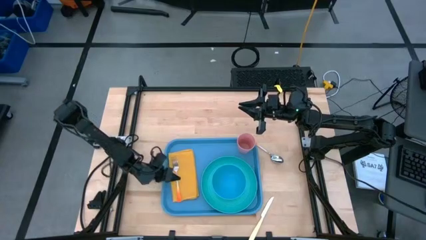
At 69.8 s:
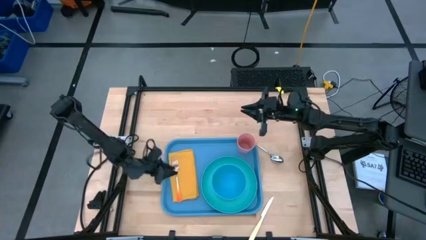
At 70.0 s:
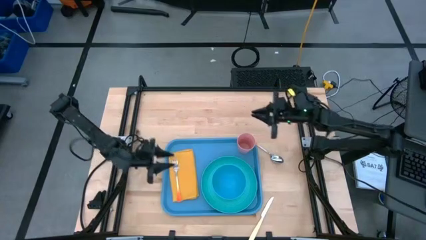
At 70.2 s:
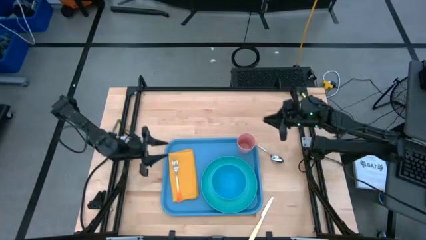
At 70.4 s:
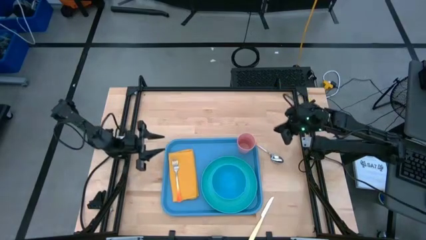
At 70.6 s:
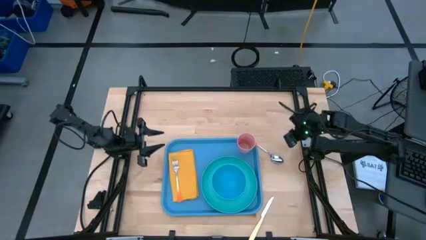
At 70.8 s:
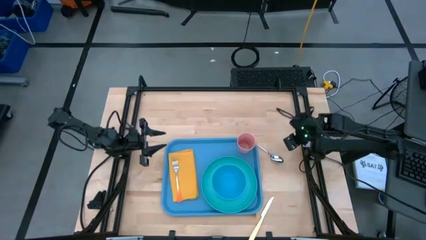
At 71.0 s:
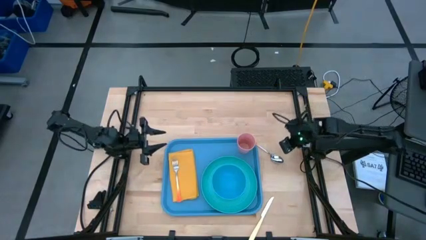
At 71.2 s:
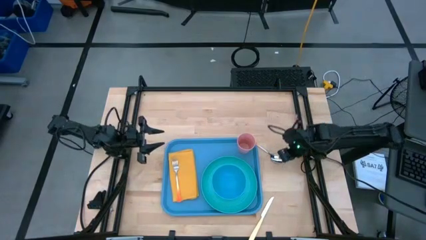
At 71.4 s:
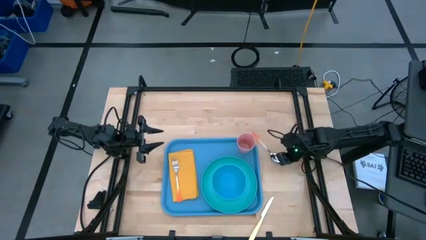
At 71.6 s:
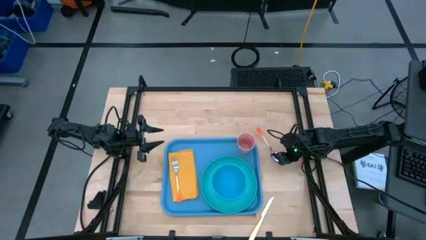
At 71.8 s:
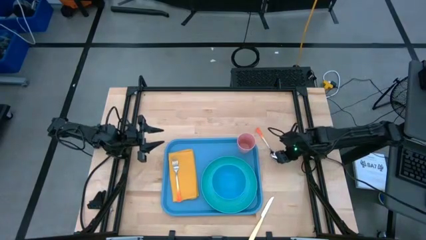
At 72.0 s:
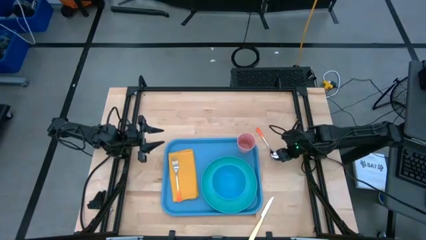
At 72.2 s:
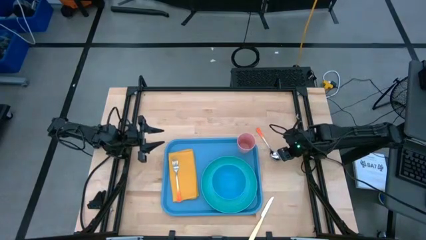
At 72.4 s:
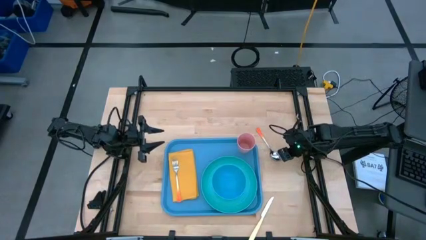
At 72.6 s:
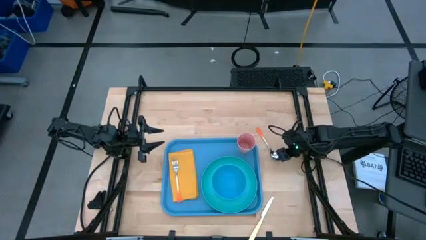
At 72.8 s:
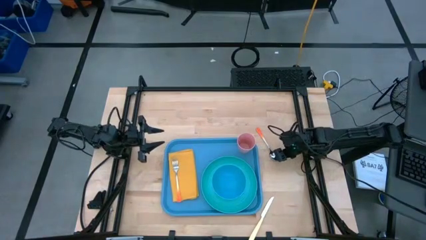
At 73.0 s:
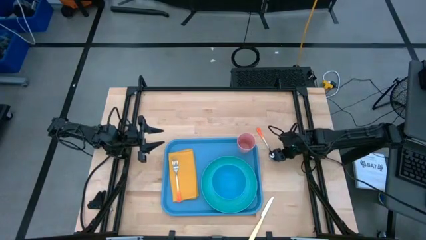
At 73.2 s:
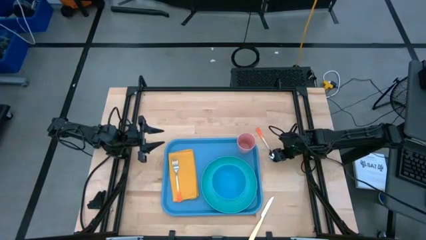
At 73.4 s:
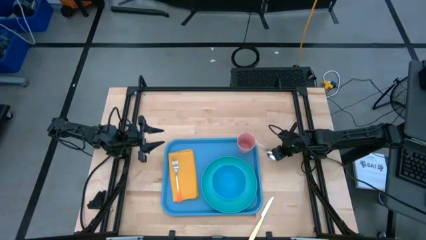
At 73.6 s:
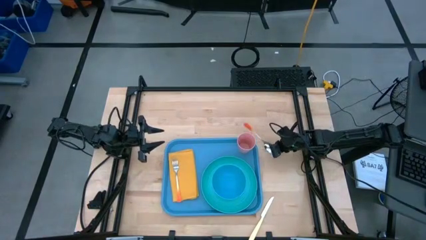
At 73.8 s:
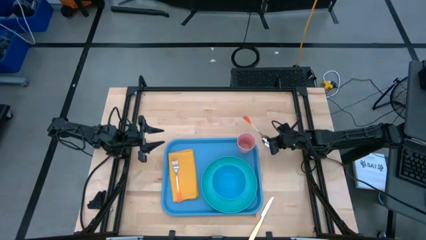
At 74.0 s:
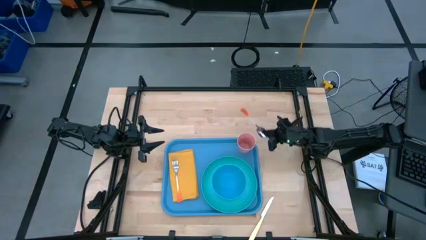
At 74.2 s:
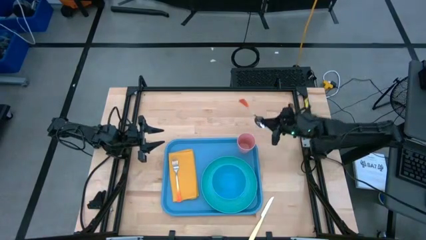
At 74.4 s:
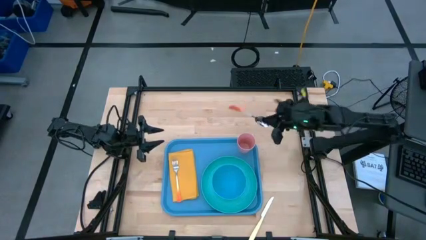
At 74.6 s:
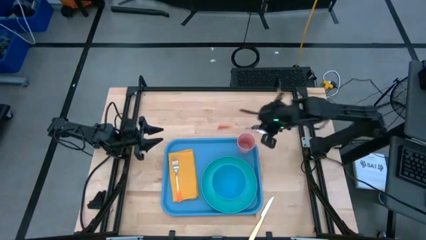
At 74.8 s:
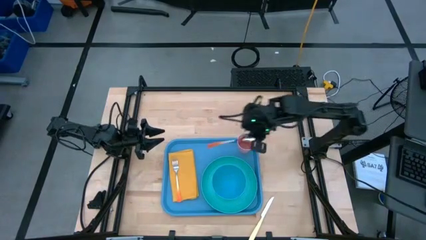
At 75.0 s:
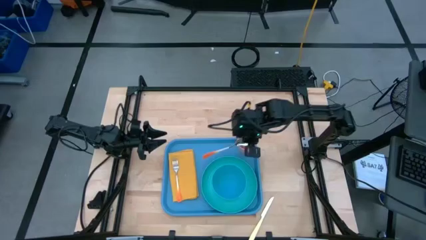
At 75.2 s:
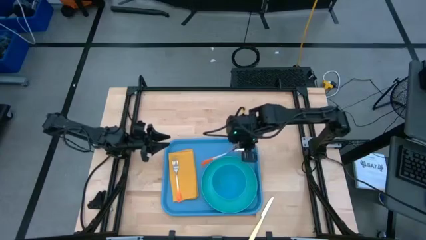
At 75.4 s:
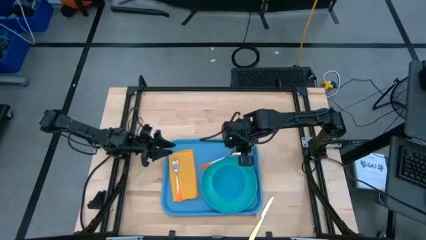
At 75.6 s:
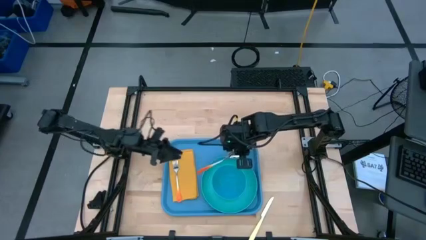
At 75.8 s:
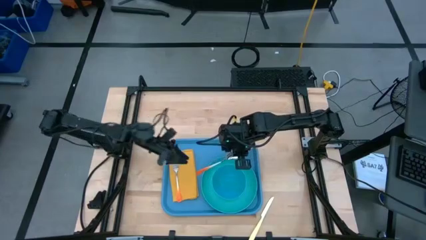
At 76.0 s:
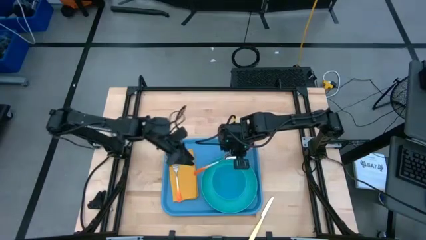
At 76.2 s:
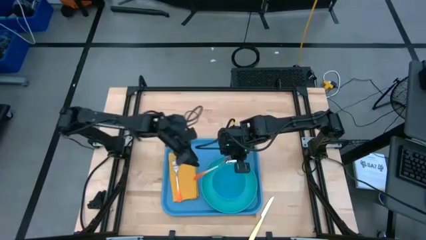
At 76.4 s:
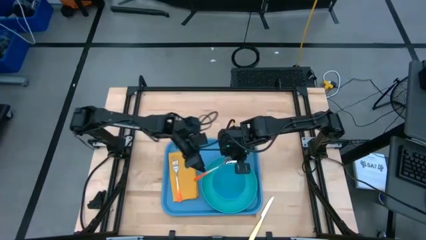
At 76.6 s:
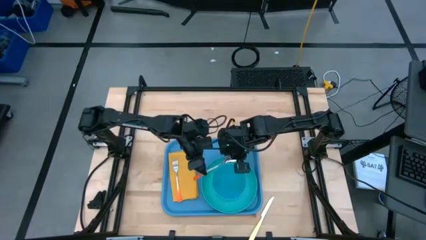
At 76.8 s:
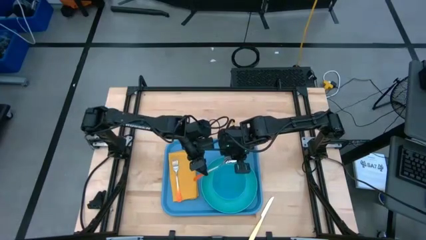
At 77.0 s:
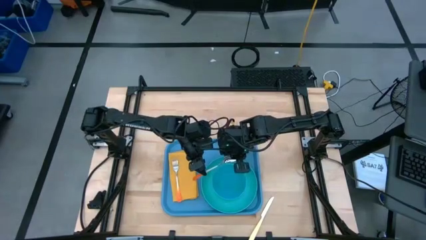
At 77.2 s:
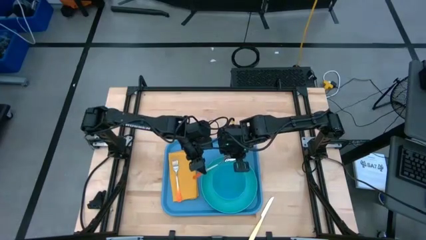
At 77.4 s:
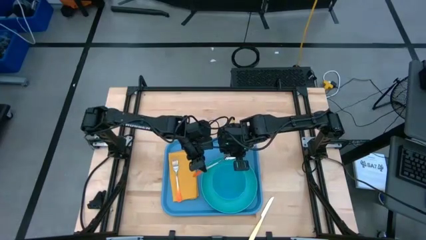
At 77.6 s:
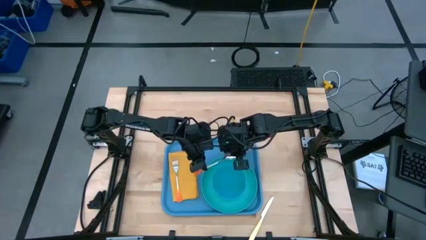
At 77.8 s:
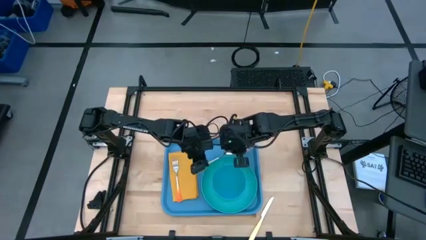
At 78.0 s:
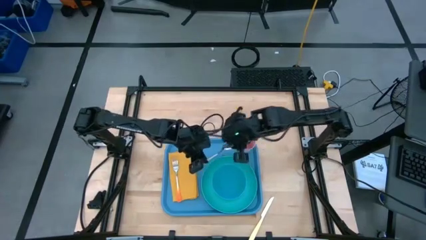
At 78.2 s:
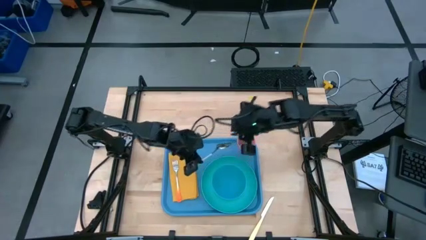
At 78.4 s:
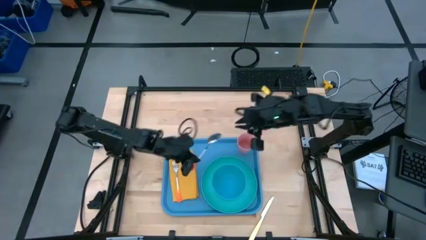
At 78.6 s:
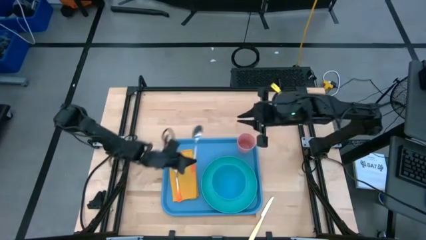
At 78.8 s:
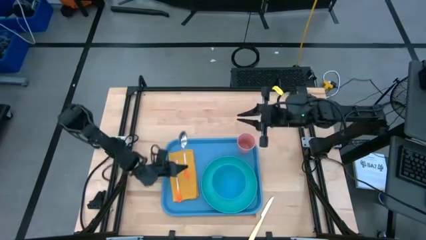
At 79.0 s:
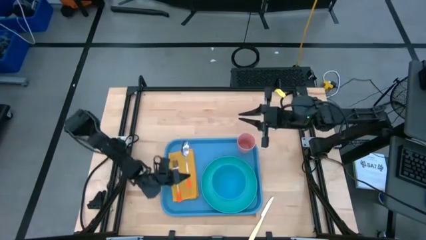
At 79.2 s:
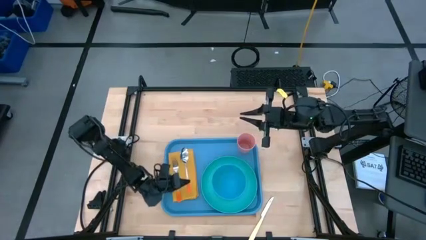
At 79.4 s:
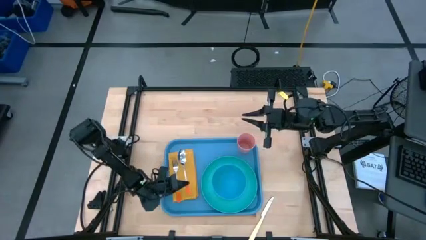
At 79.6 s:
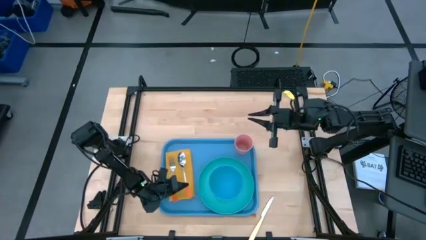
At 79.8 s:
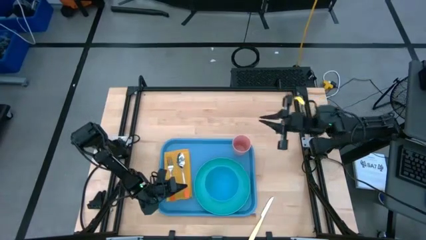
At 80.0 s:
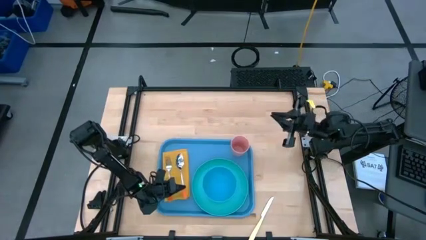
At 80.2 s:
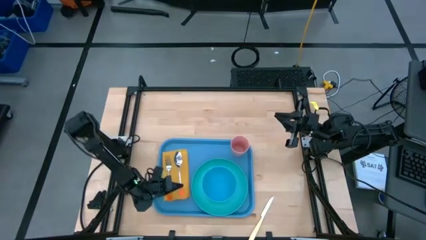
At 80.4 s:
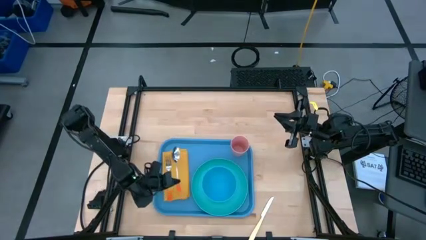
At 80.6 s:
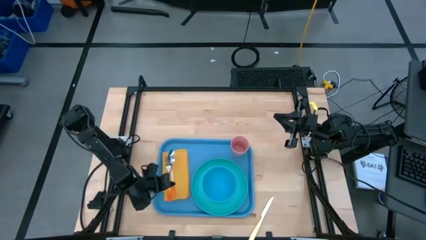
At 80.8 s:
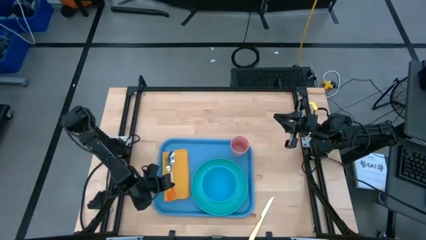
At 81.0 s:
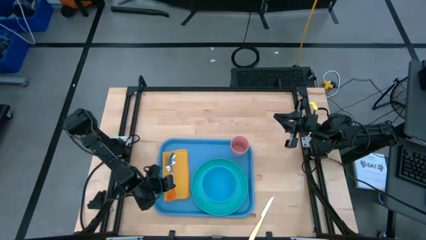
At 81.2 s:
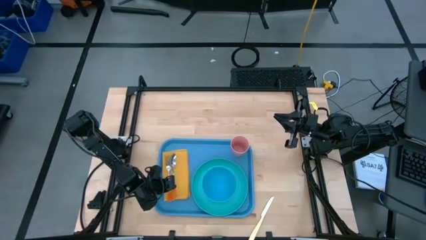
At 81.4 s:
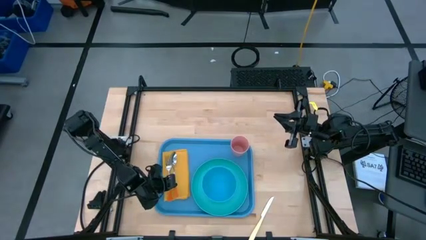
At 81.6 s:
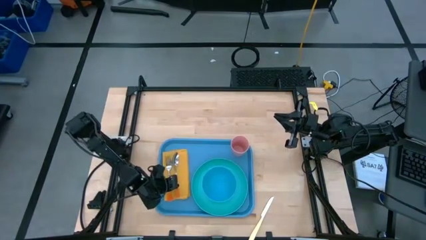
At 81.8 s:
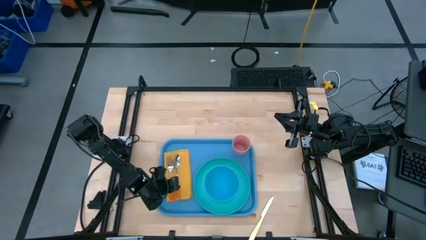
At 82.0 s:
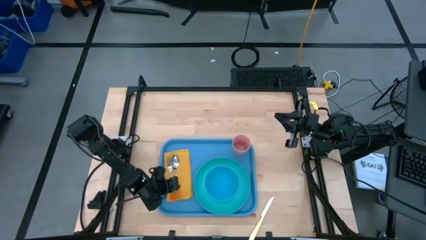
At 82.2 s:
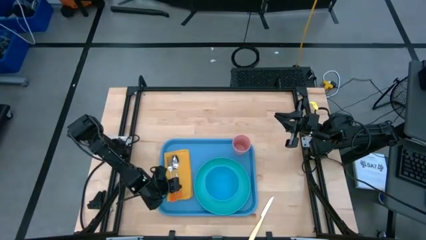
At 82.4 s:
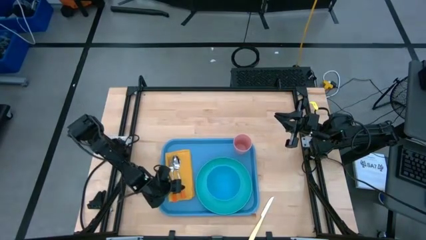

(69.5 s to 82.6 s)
Task: Set up tray
Put the orange spoon on the yellow napkin to the right of the orange fork
